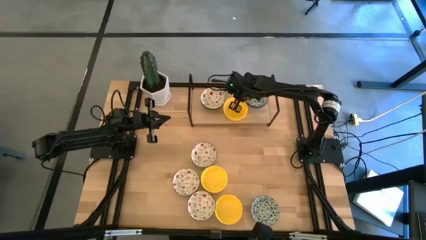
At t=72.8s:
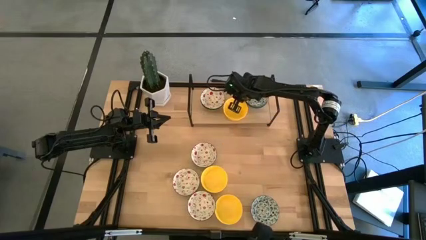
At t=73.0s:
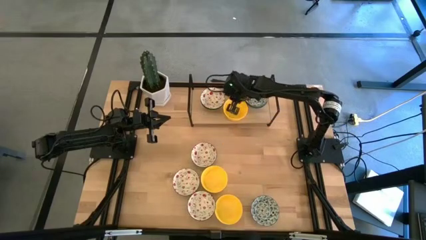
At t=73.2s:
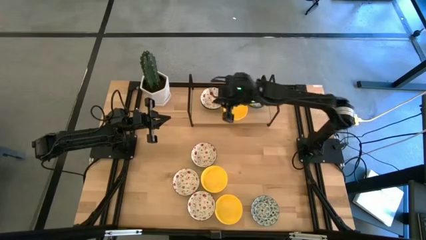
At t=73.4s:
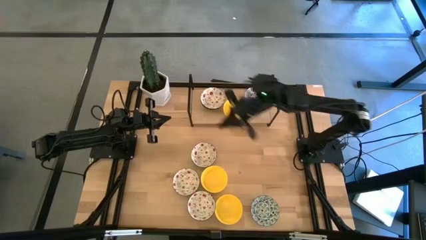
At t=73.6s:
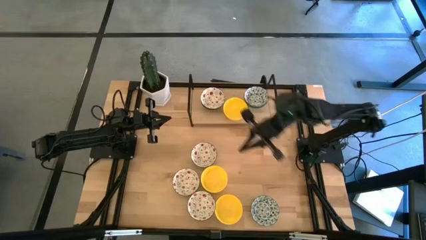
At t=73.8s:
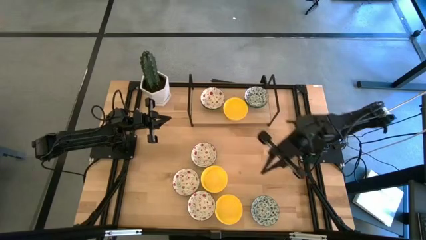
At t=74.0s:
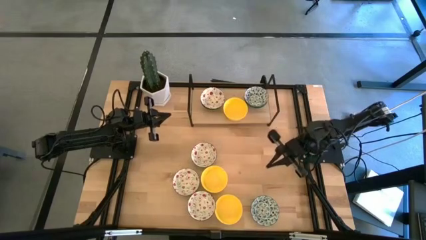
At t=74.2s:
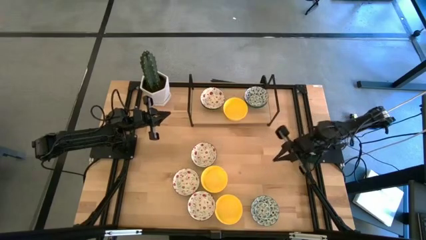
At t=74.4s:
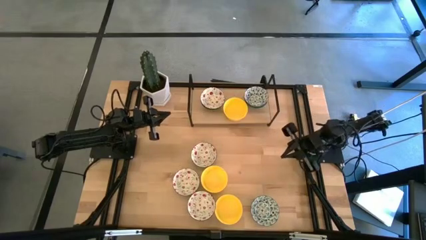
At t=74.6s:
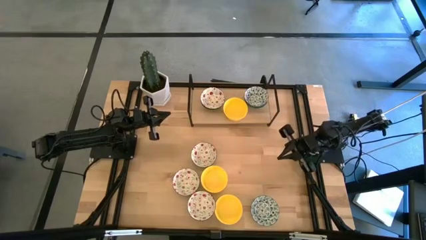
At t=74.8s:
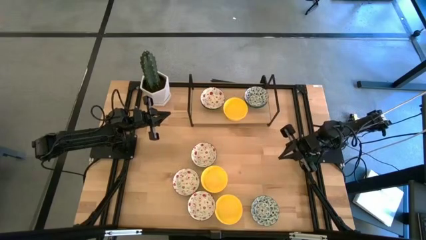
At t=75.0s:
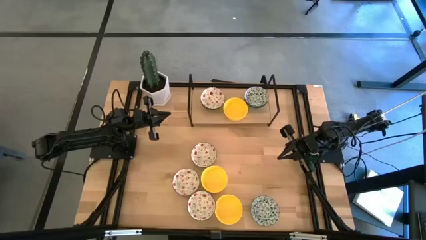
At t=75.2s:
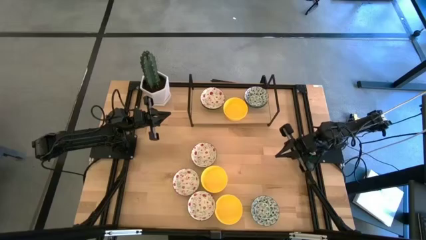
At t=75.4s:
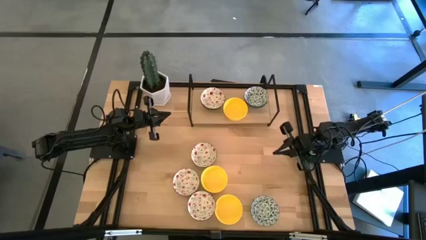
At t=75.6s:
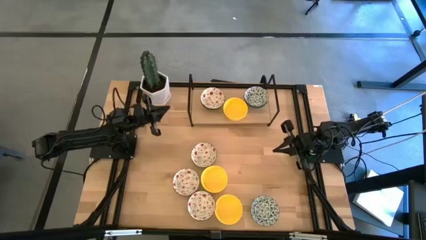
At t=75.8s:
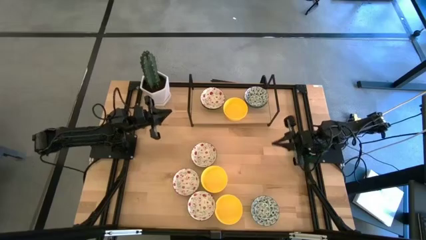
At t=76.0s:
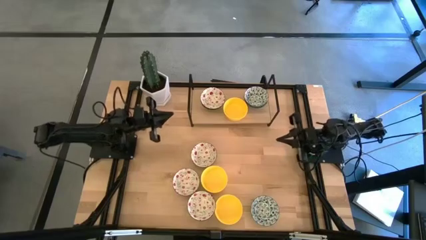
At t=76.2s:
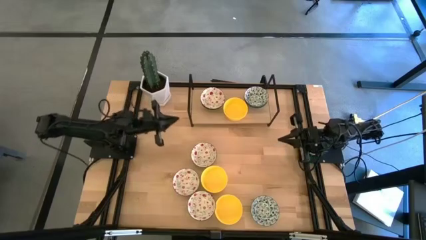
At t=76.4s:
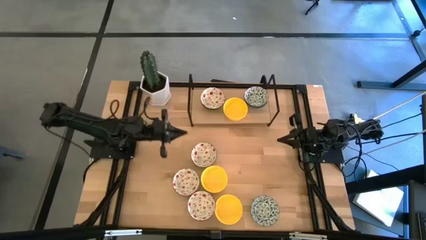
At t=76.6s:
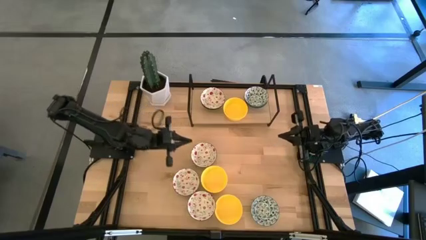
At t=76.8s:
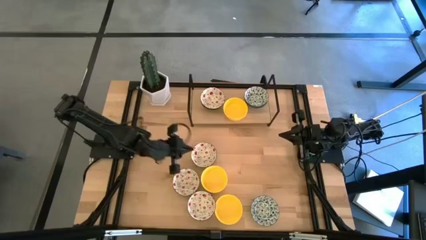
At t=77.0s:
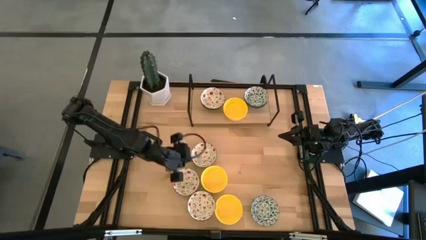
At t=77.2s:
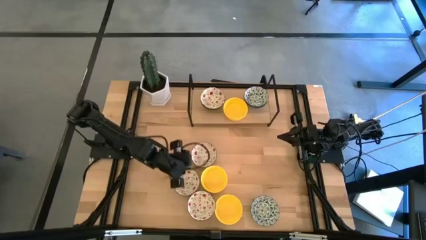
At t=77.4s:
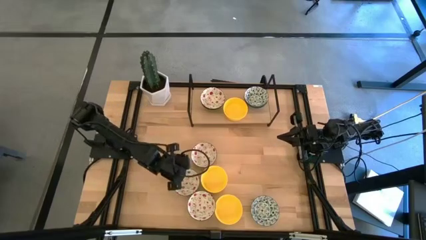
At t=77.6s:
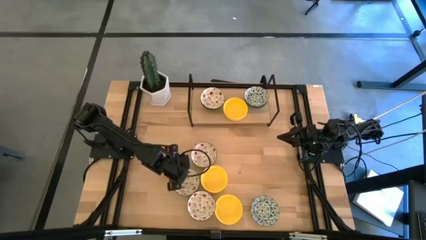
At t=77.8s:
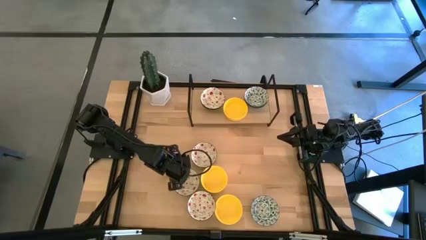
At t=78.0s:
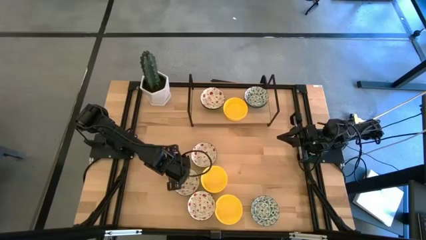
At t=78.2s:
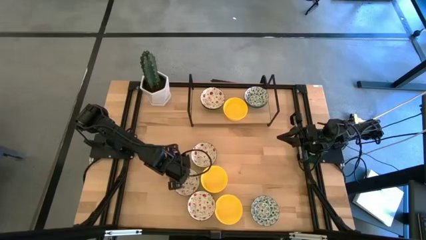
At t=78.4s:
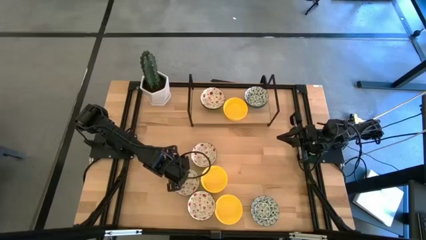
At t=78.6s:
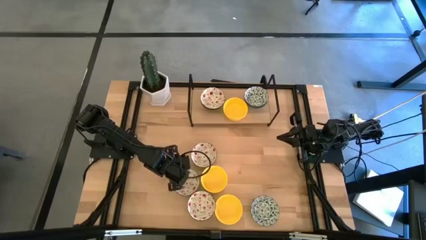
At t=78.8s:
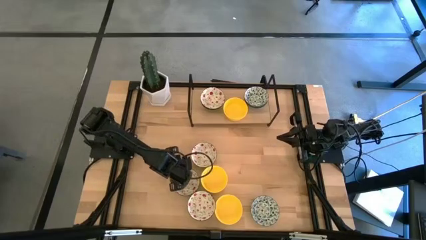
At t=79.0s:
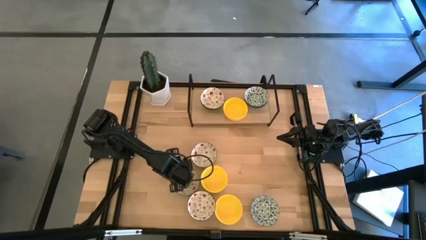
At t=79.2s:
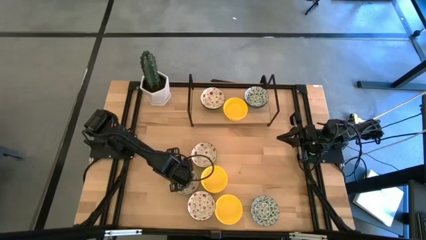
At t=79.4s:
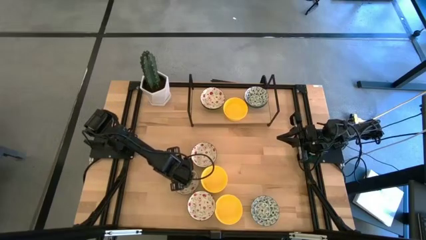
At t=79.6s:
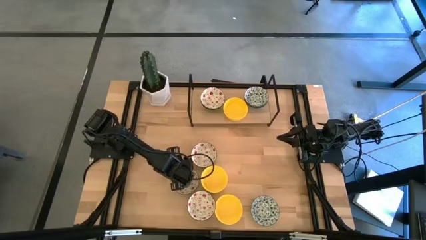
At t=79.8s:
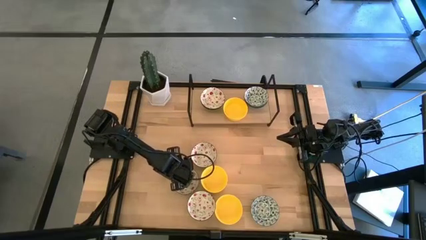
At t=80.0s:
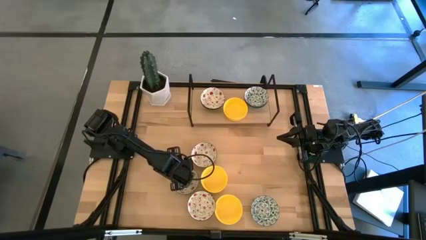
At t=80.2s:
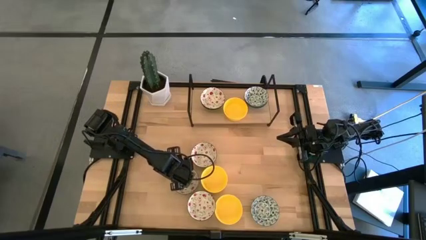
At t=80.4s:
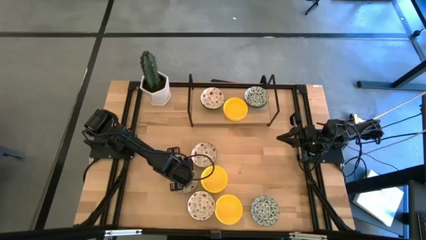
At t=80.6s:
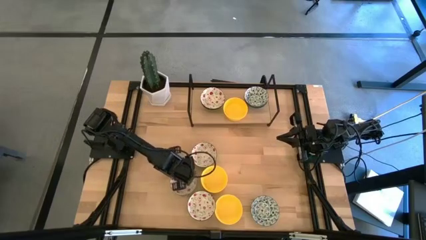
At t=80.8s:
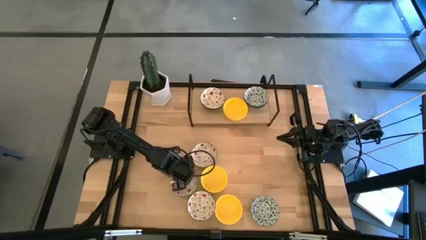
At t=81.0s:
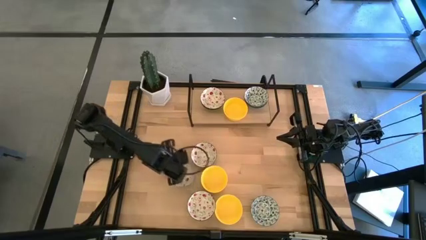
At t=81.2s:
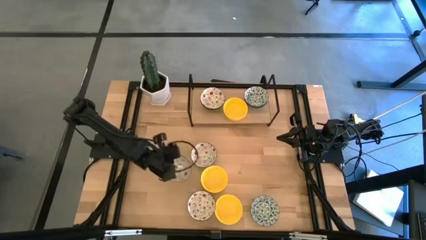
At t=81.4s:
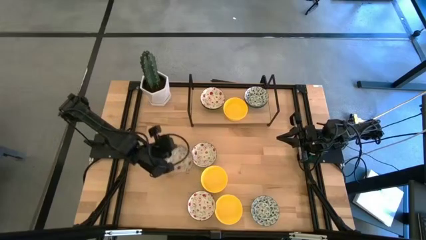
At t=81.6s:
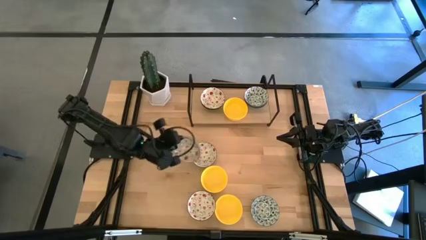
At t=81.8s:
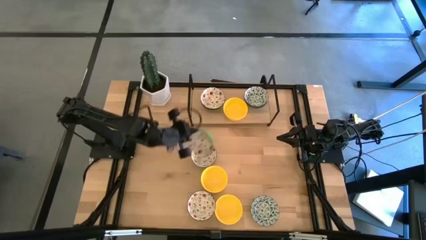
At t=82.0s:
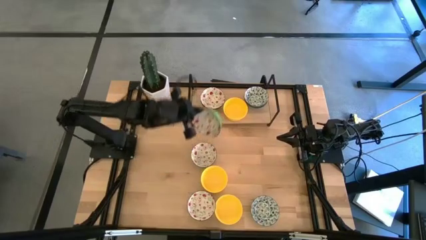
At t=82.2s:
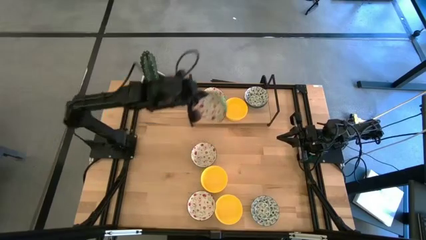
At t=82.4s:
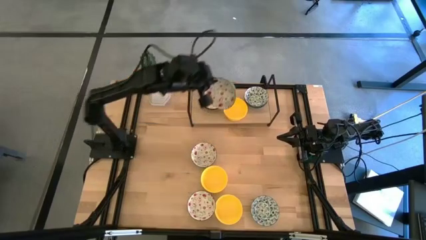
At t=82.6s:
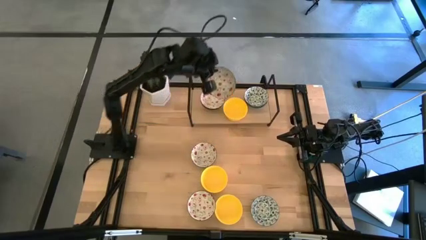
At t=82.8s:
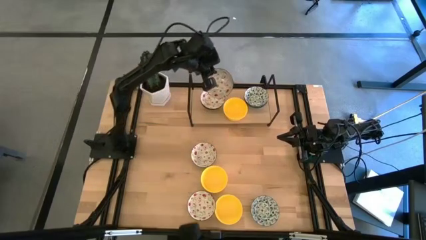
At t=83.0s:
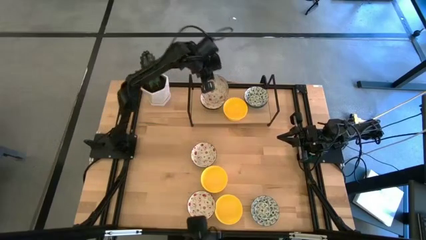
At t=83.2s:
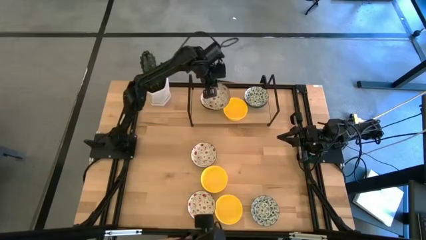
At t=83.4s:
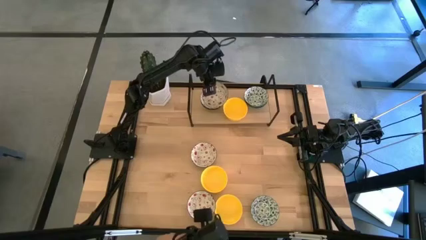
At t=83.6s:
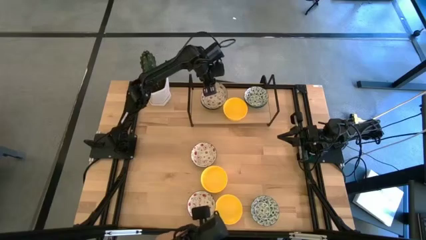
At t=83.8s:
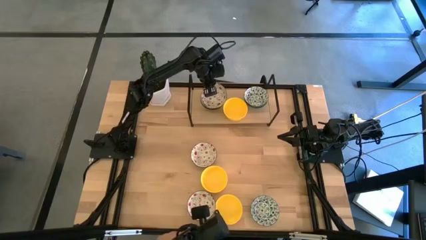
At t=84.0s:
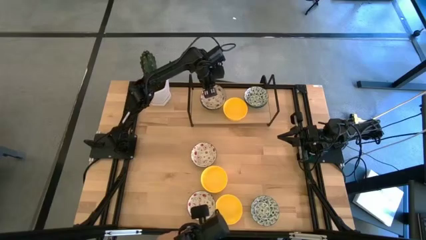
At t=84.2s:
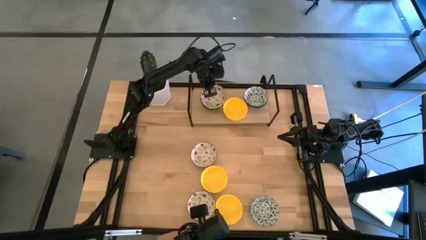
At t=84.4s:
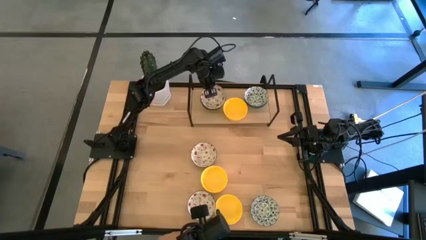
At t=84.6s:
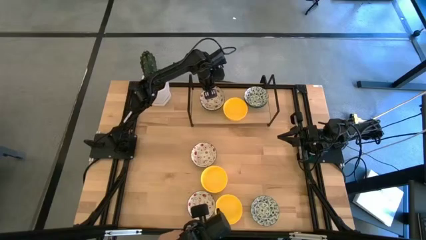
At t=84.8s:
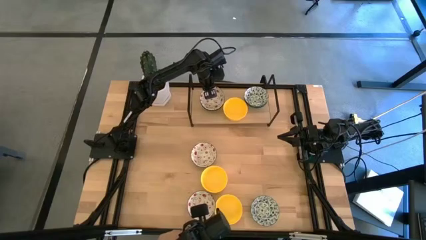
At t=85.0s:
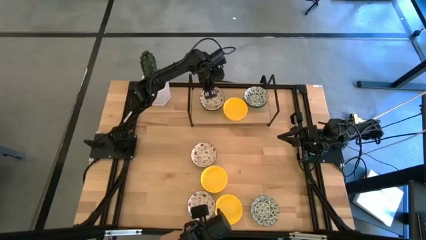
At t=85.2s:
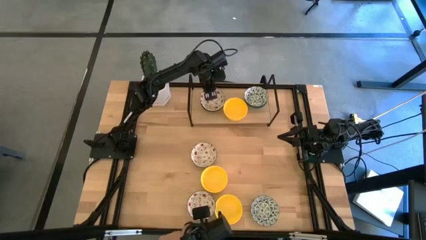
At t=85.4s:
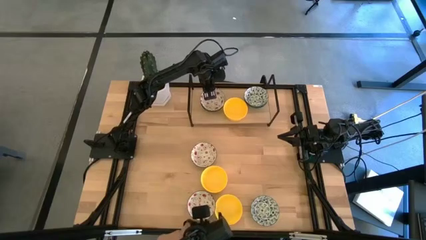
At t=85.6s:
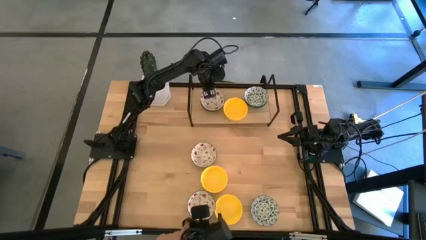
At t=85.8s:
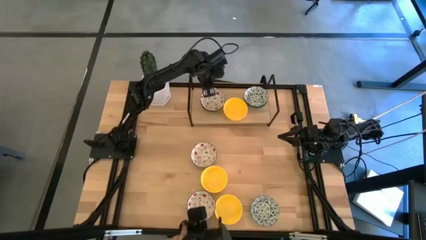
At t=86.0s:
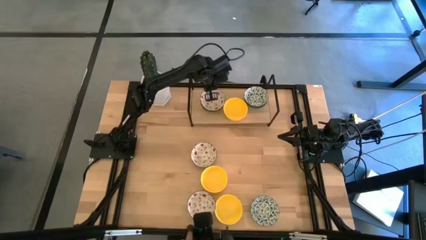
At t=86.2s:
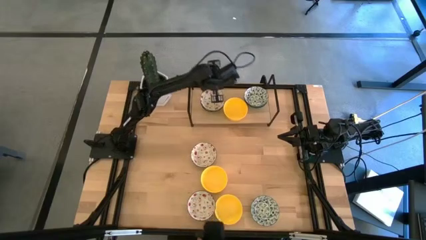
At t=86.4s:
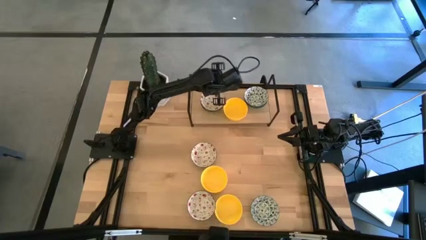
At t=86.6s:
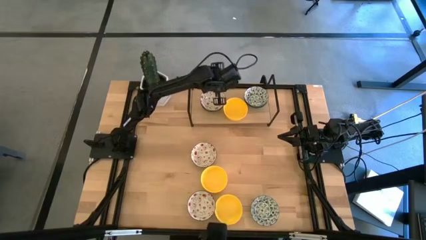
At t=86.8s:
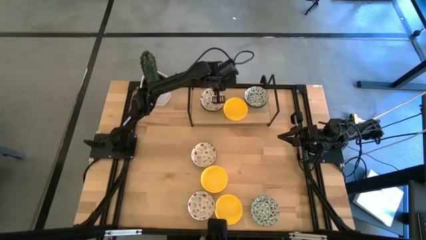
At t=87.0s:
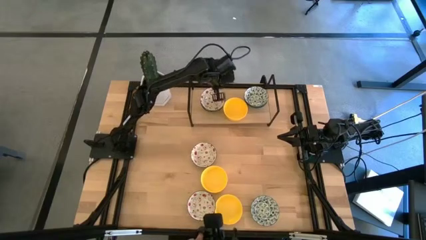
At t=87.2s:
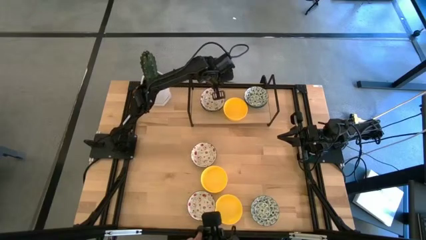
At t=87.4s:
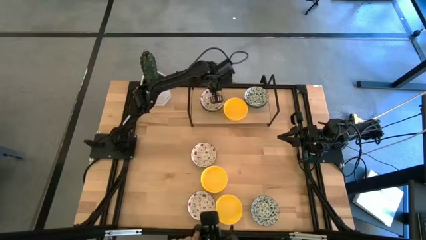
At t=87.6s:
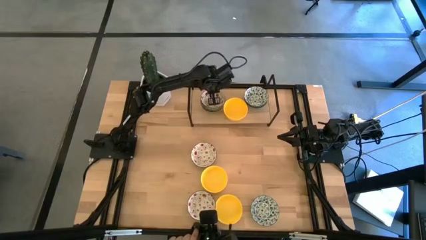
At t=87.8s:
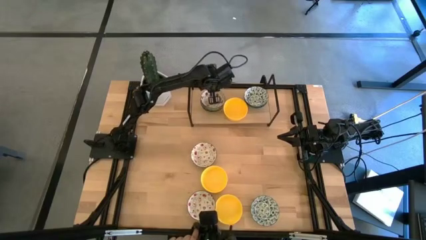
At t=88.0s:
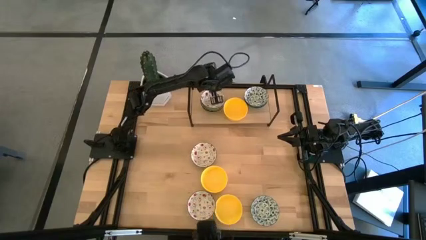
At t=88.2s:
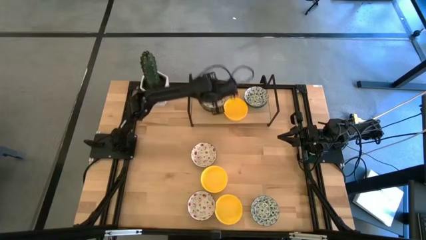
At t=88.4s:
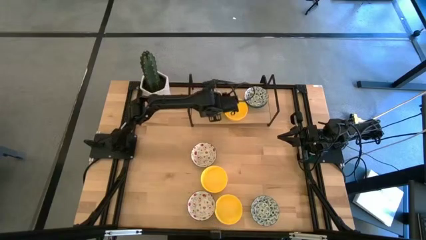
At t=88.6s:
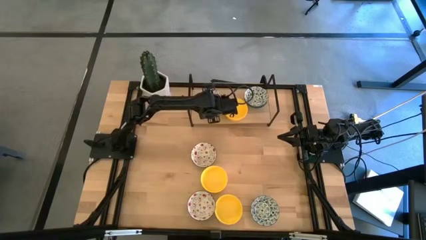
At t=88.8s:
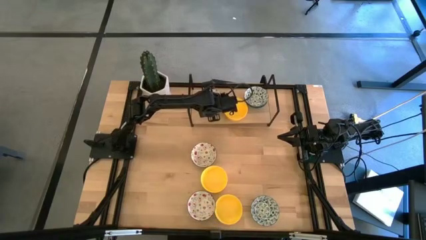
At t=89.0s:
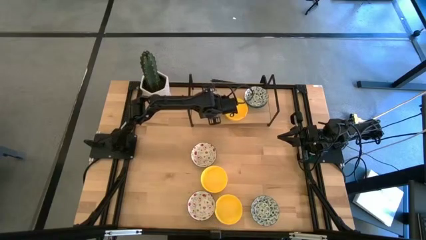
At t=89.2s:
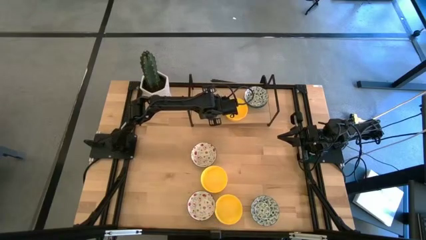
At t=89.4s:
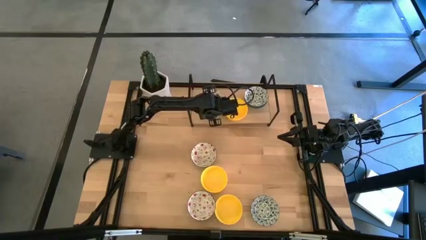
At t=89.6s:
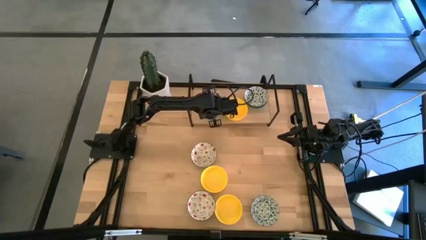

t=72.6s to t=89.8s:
Task: Pick & Place Mini bowls
Stack the white bowl on top of the white bowl on the shelf
